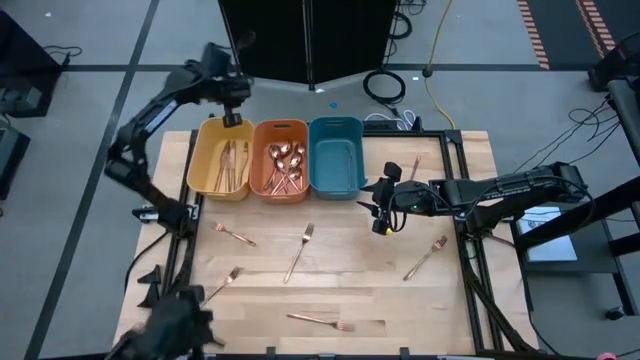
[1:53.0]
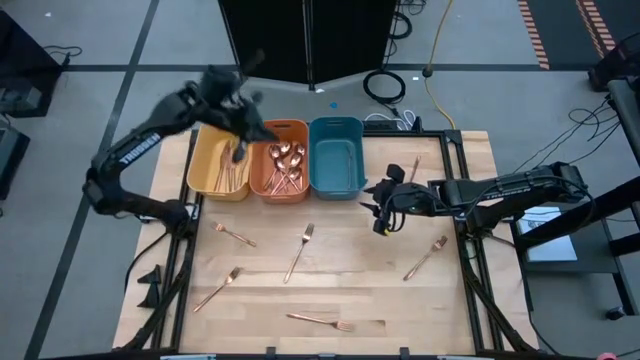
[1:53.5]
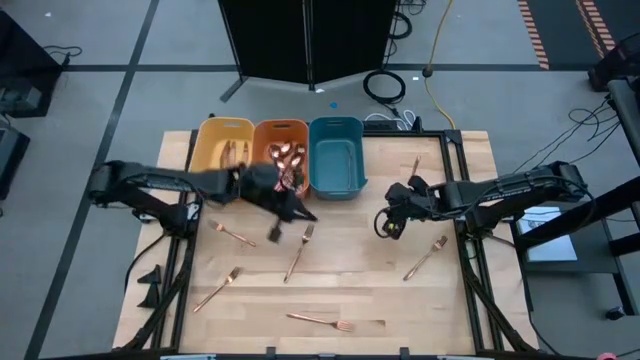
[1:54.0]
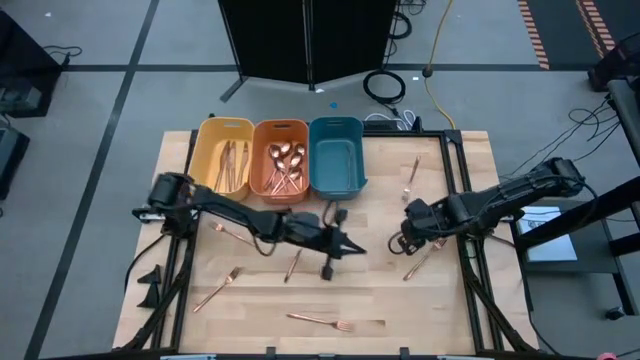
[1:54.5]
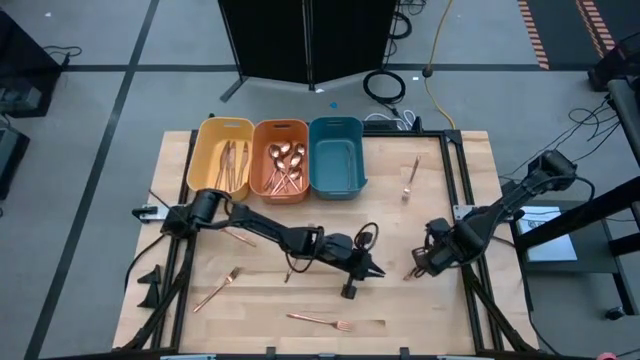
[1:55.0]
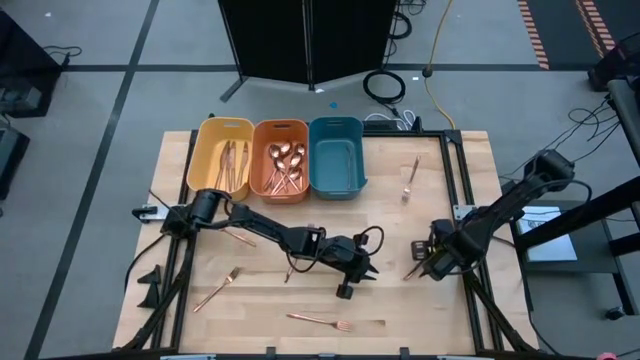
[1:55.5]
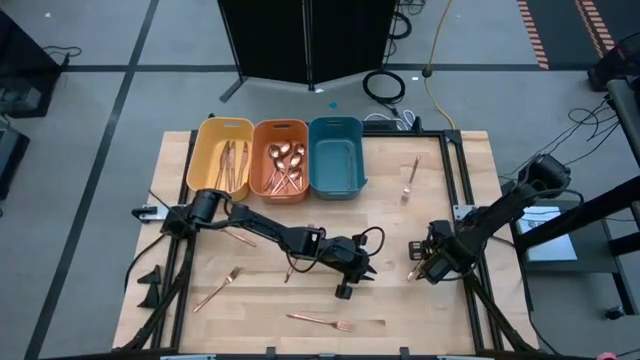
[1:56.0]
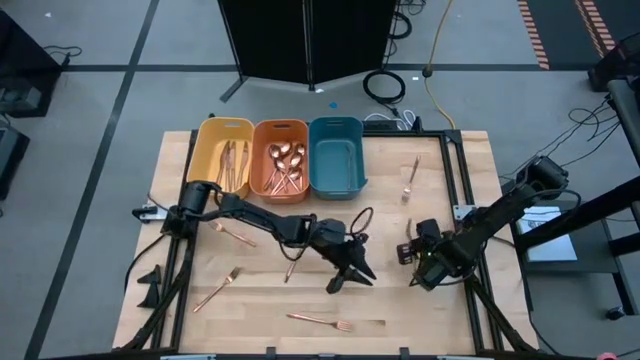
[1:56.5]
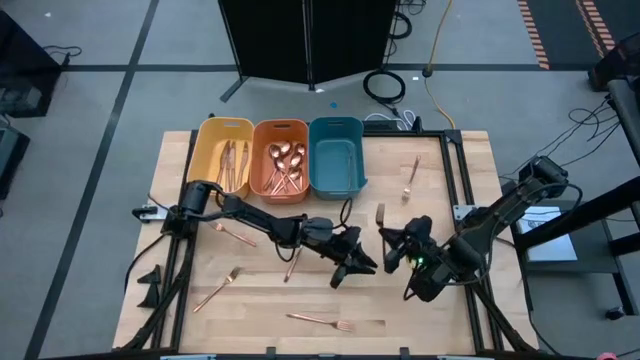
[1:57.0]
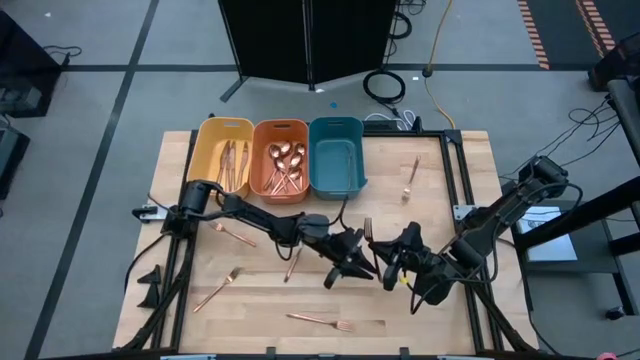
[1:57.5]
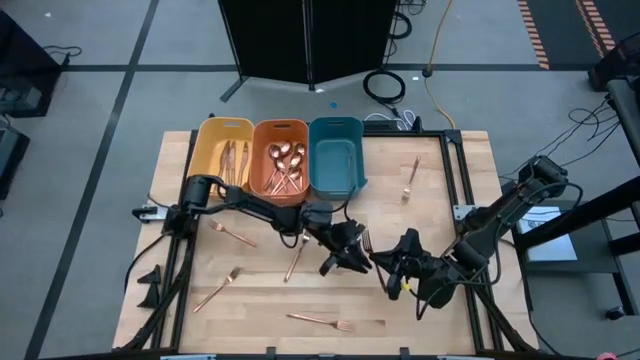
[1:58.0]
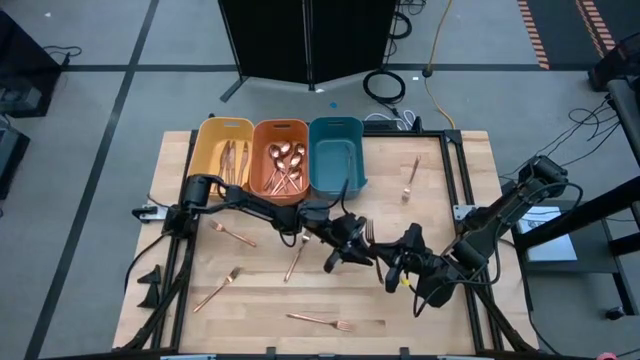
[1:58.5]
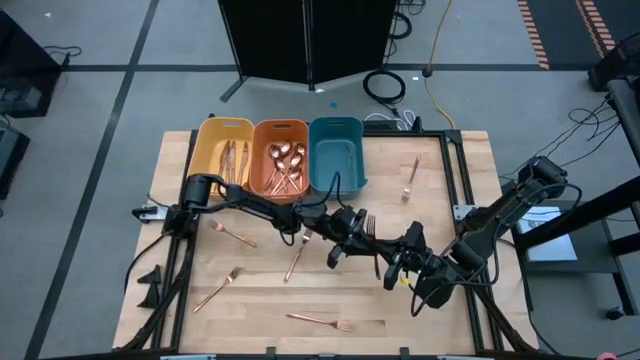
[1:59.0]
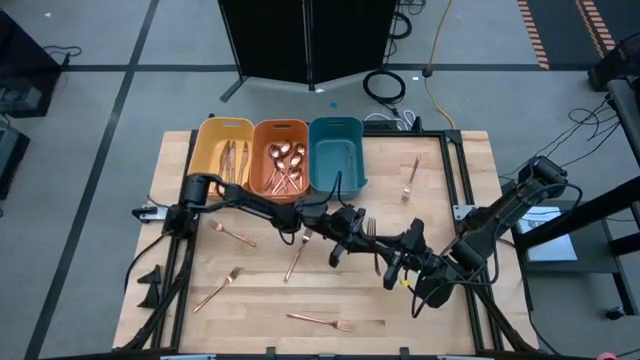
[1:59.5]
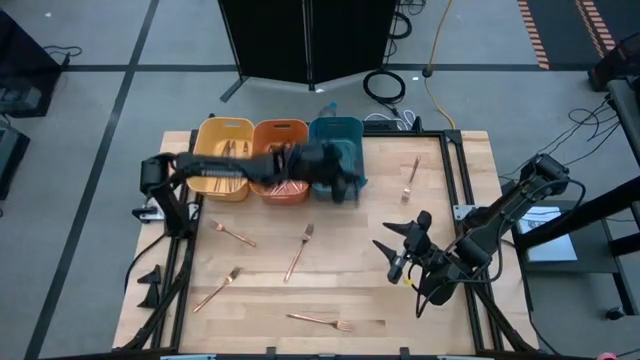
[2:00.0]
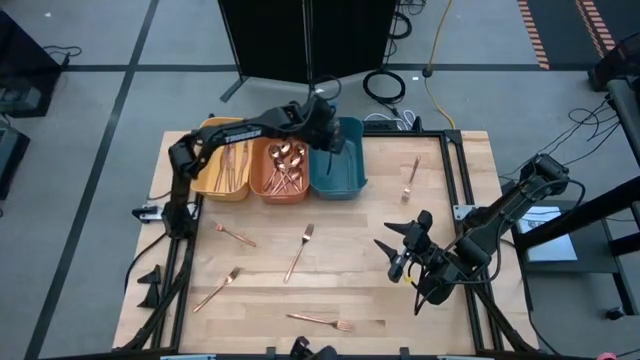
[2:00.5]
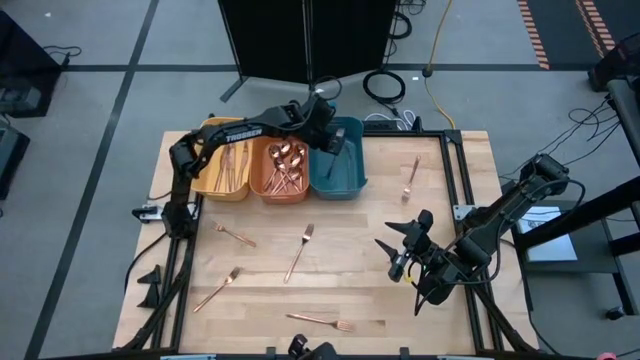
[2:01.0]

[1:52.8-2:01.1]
Task: Sort silverware
Put the gold fork into the blue bin

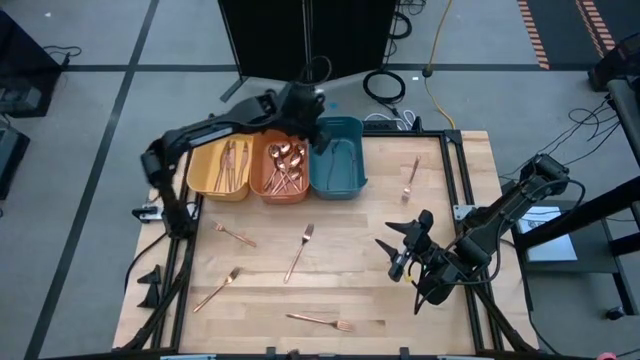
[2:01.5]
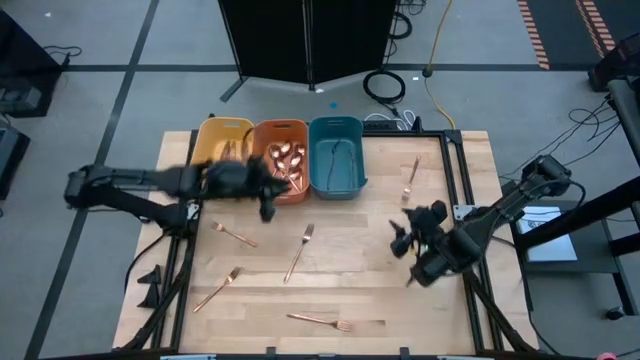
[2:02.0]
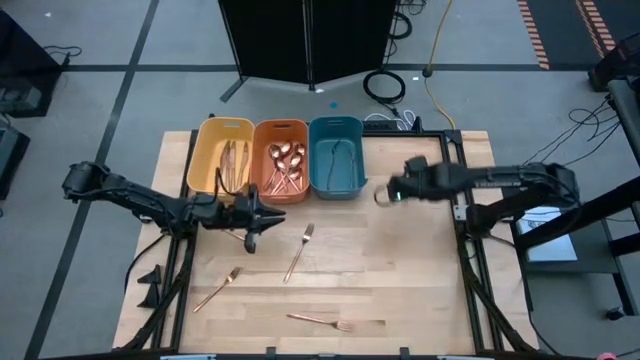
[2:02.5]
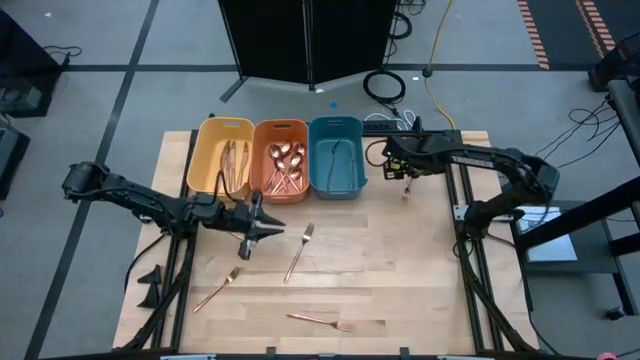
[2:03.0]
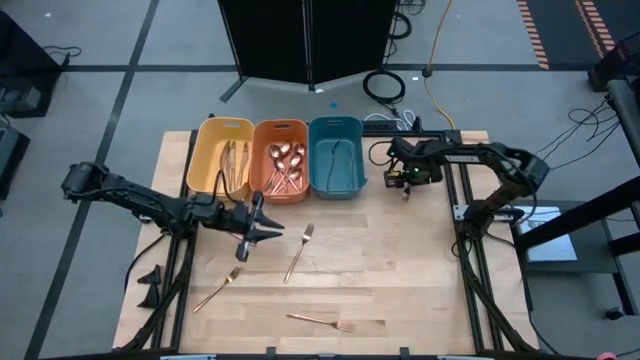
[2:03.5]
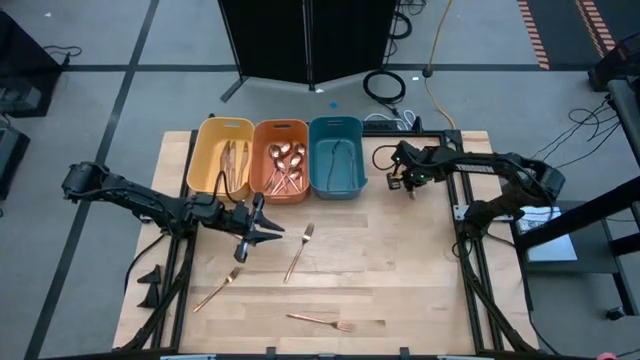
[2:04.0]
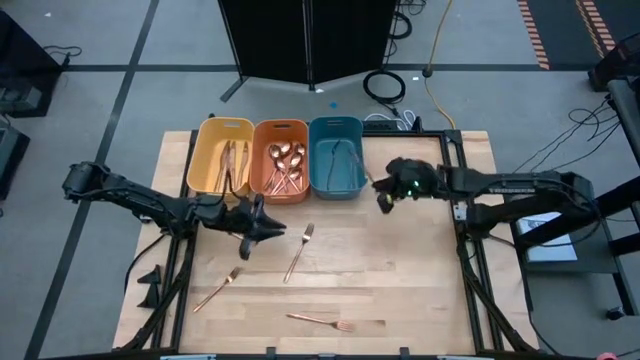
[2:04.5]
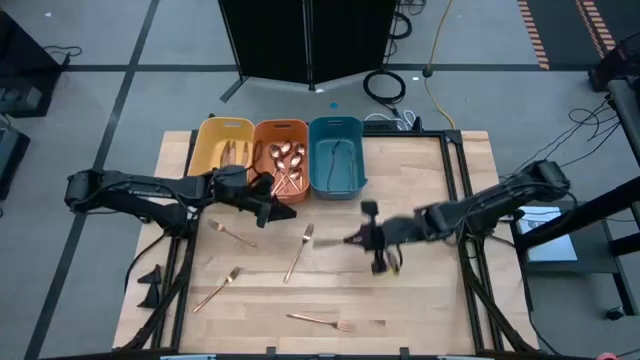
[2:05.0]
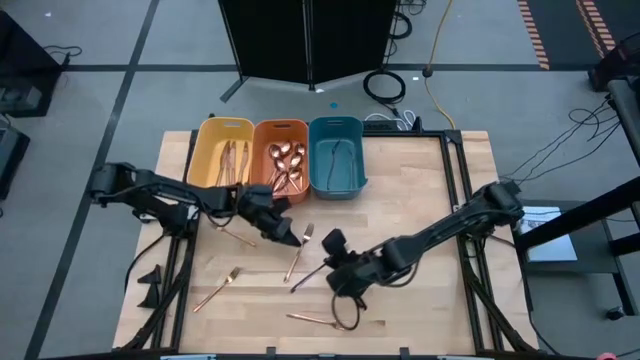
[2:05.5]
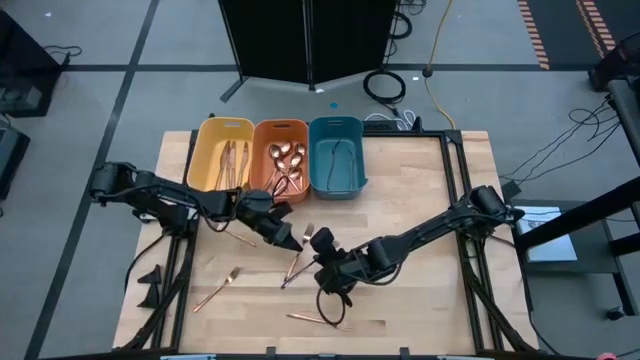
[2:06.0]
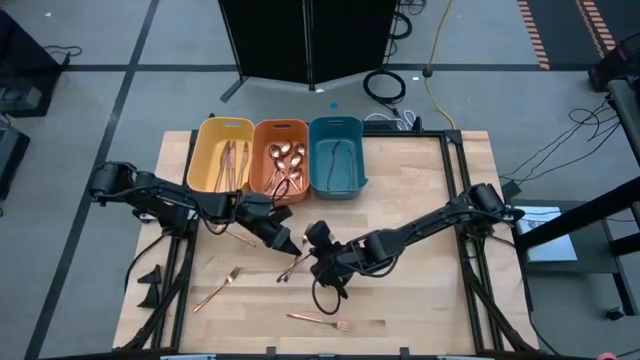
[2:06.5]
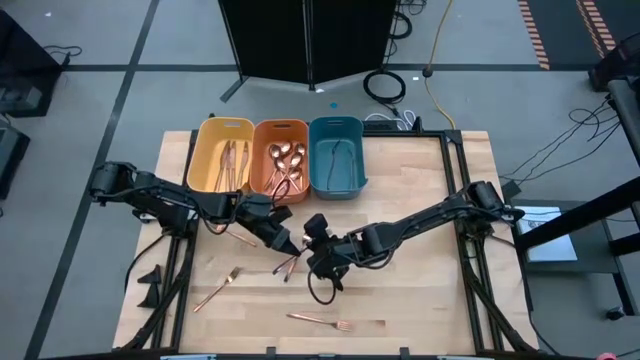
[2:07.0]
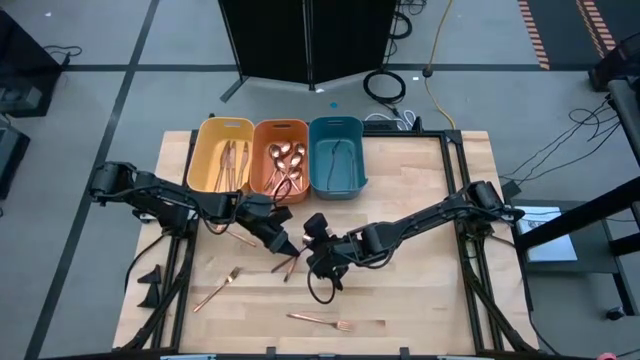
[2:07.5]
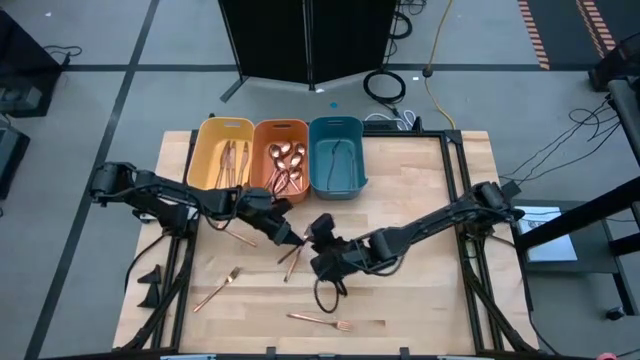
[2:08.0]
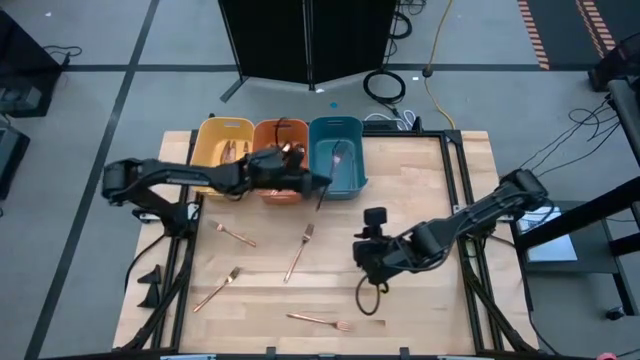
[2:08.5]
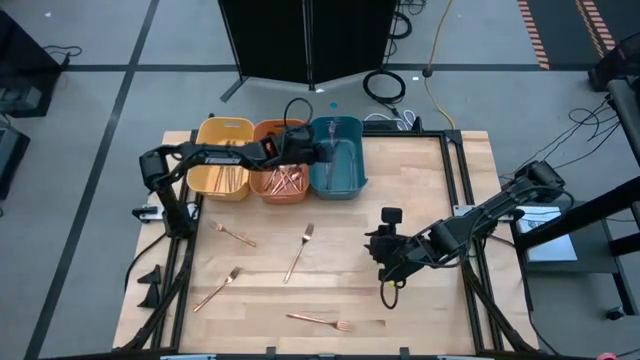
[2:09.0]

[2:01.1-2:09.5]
Put the gold fork into the blue bin

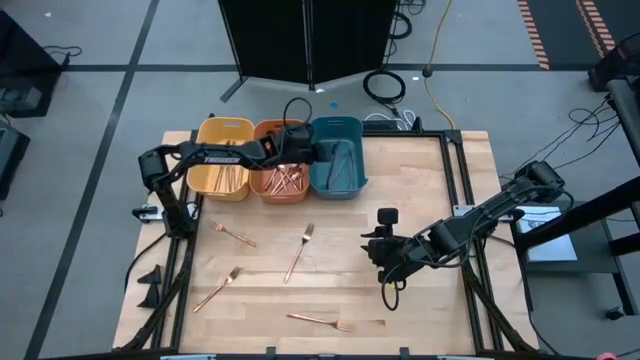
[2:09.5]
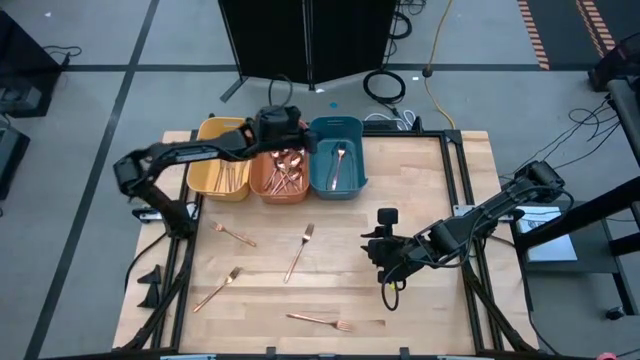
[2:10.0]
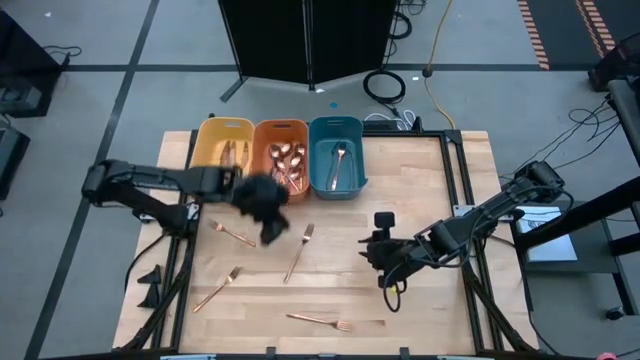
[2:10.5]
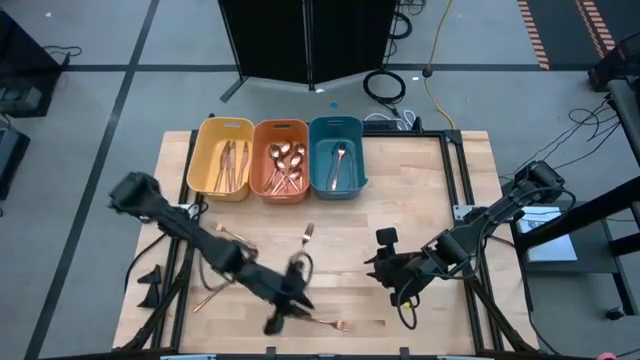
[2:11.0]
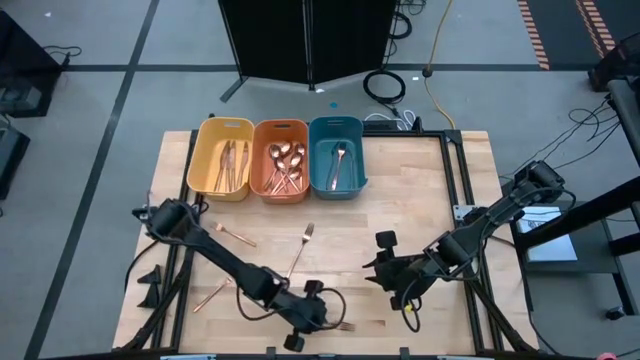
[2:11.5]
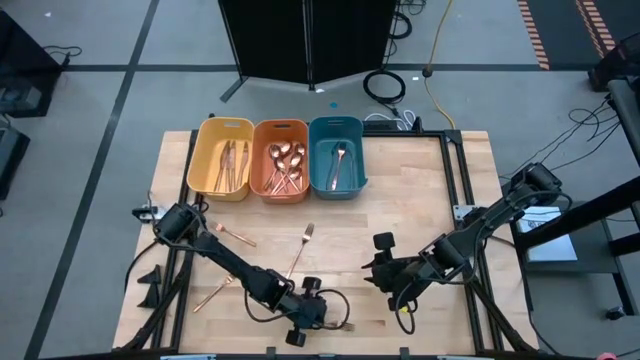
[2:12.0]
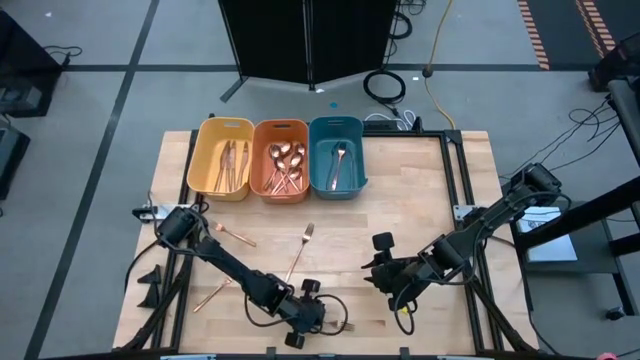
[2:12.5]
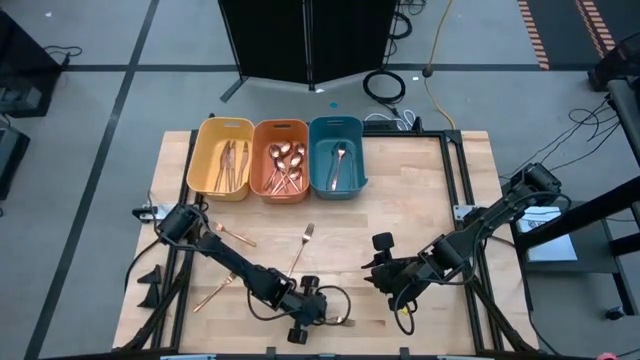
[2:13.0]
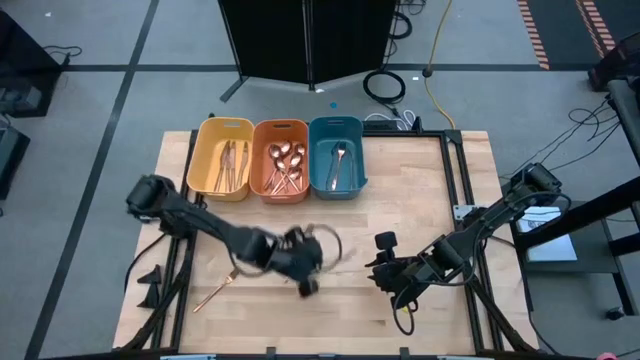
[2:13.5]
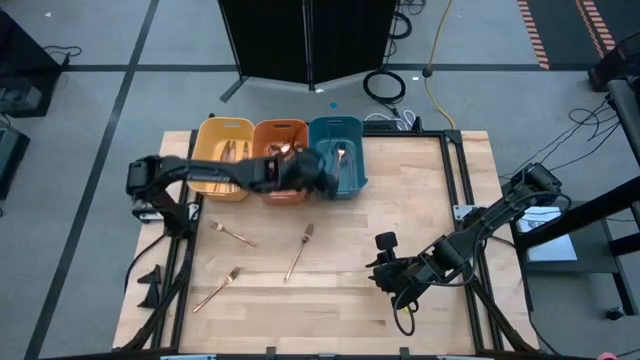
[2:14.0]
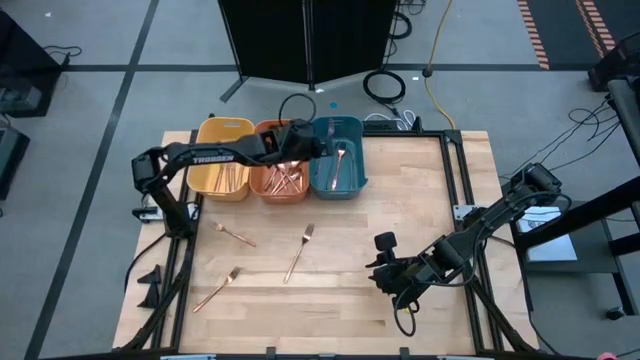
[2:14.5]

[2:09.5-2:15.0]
Put the gold fork into the blue bin
